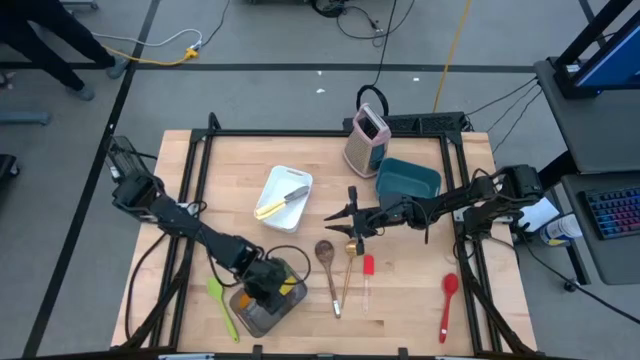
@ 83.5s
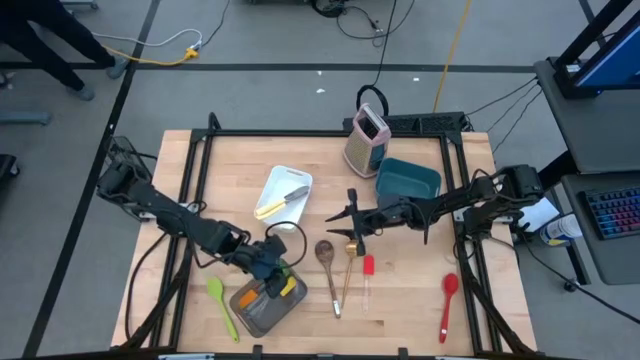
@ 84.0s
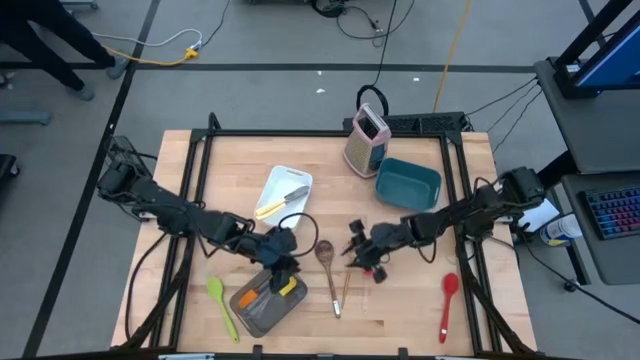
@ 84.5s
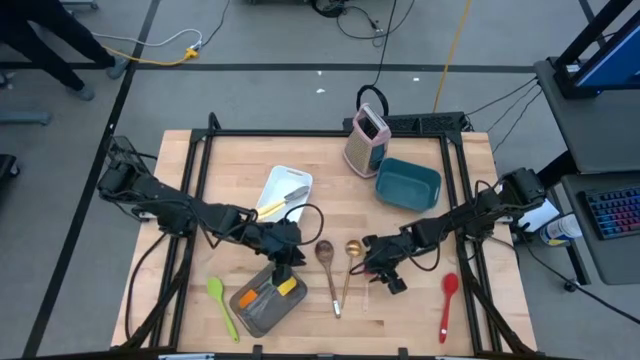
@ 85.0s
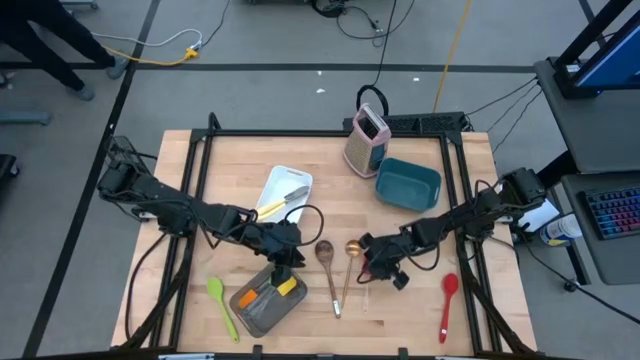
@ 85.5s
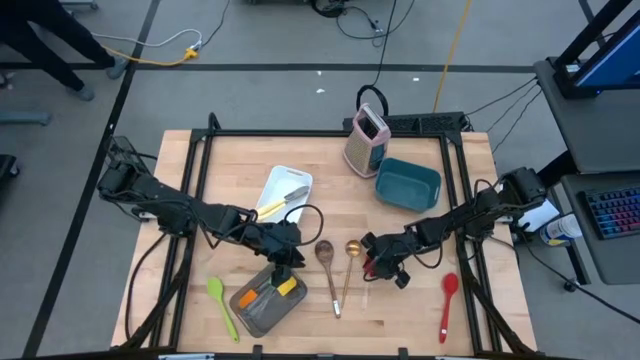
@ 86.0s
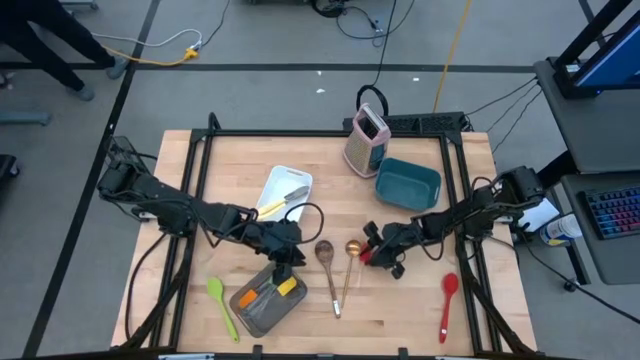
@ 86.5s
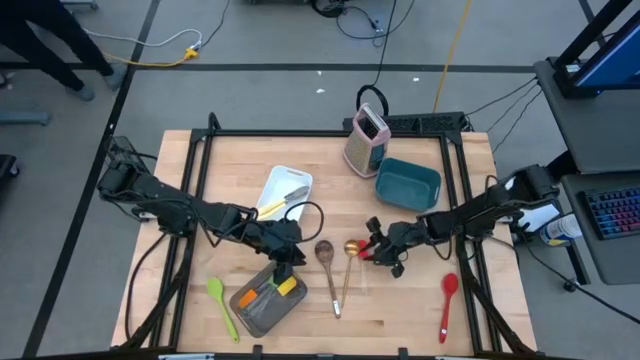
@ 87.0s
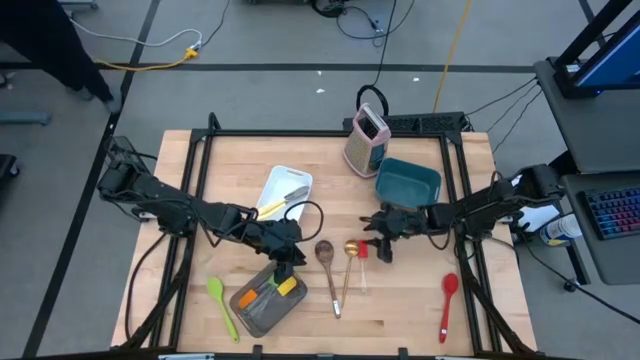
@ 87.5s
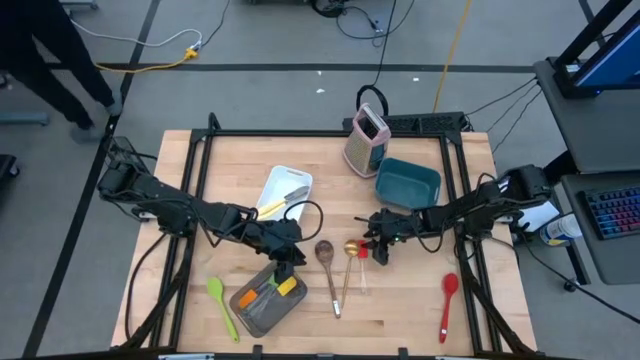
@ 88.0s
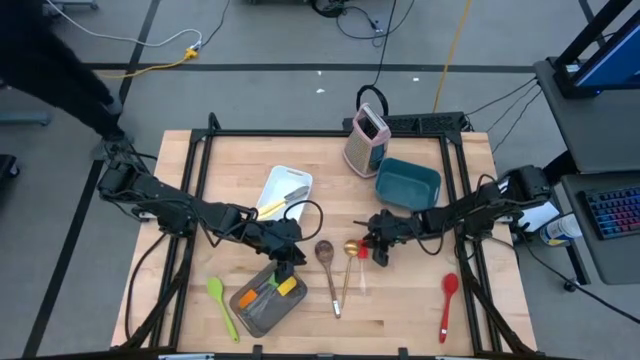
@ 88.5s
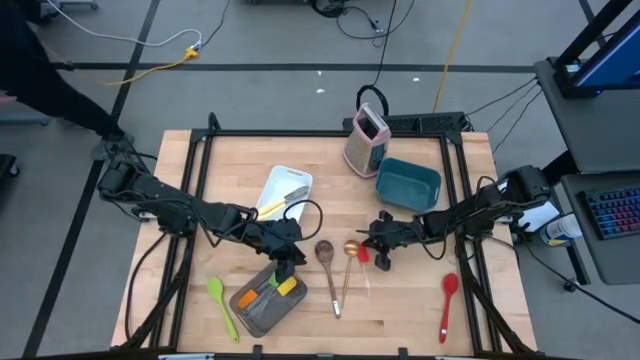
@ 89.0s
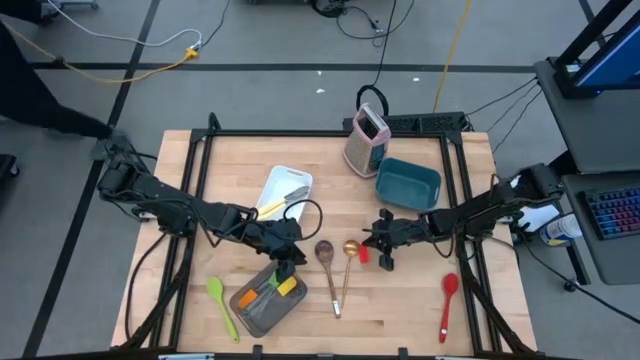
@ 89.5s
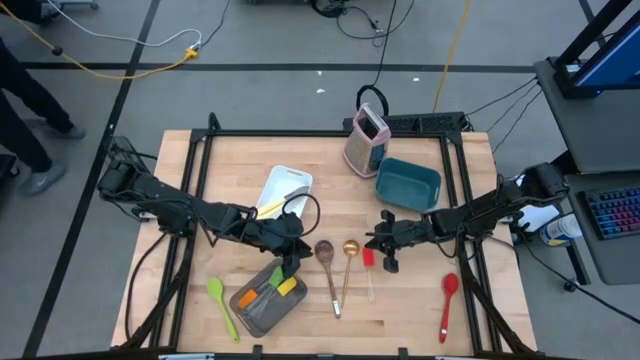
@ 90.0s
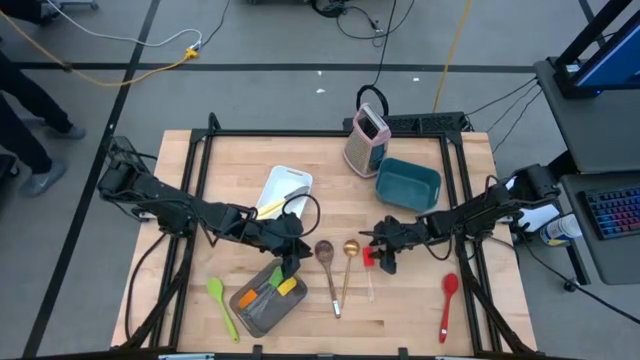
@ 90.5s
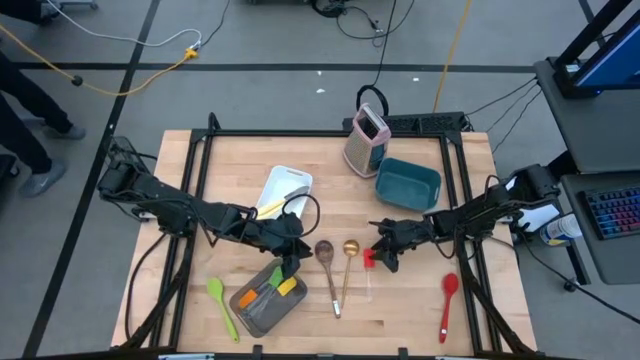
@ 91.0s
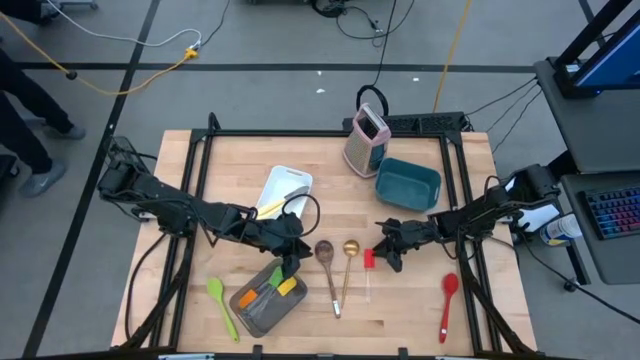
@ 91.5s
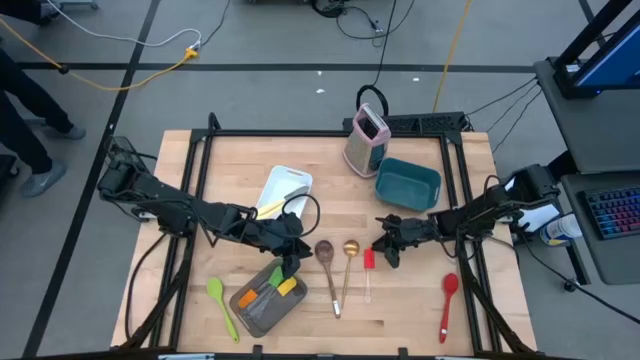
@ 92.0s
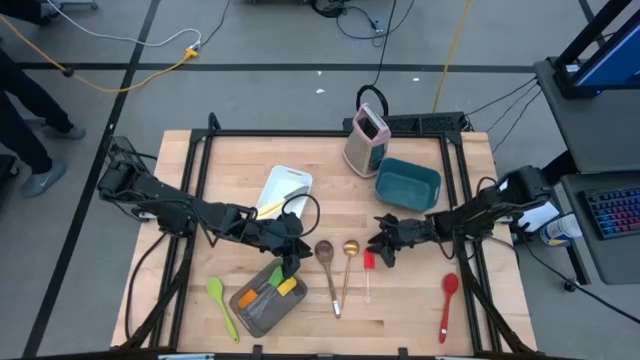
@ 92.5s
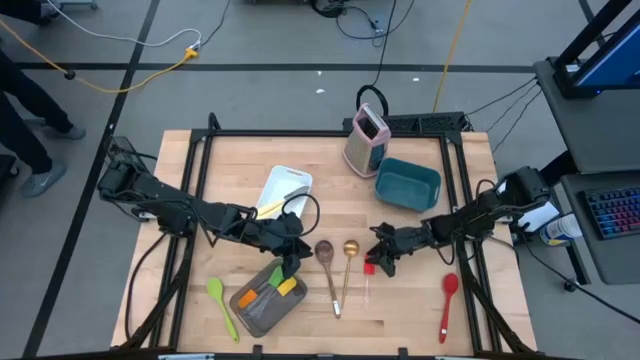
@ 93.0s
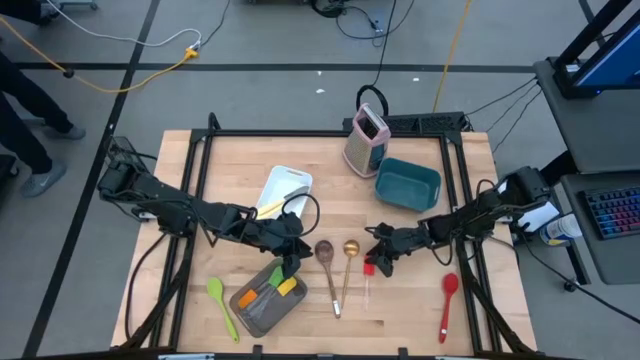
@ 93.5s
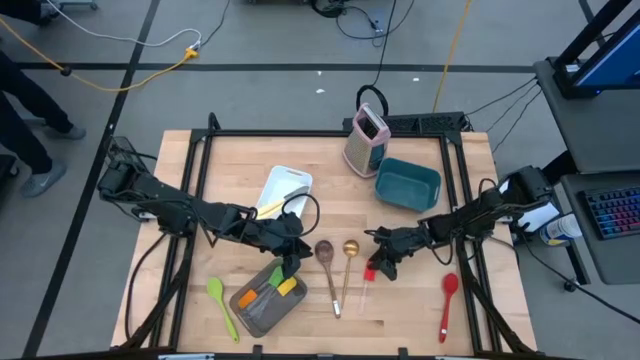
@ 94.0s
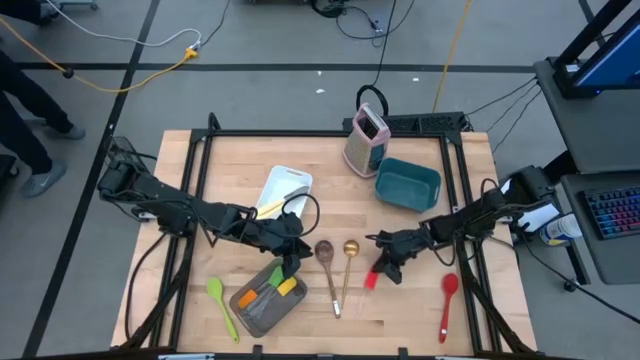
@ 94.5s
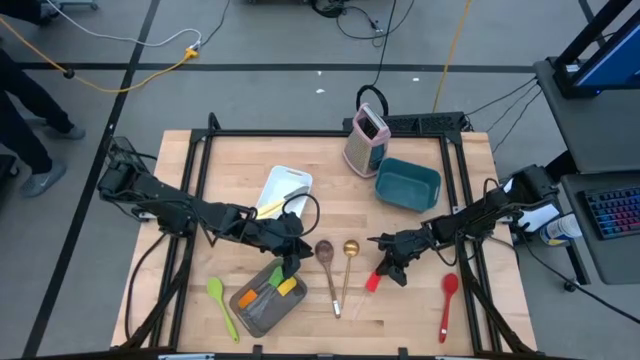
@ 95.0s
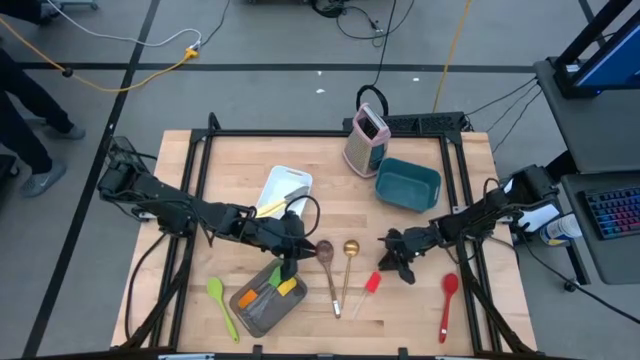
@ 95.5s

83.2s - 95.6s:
Task: Pick & Place Kitchen Items
Put the red spatula into the black bin

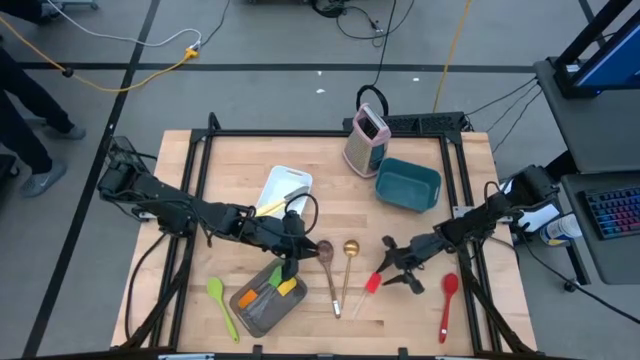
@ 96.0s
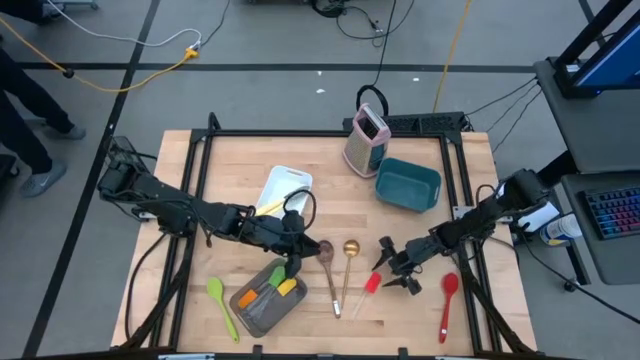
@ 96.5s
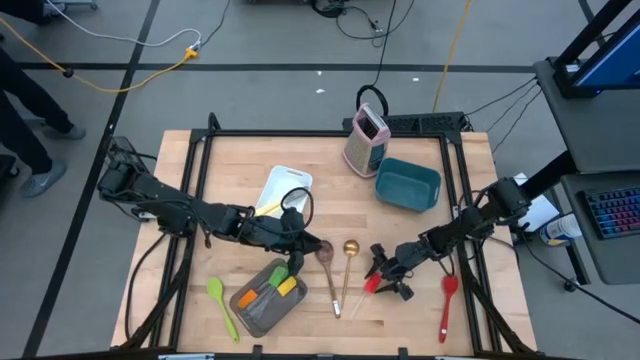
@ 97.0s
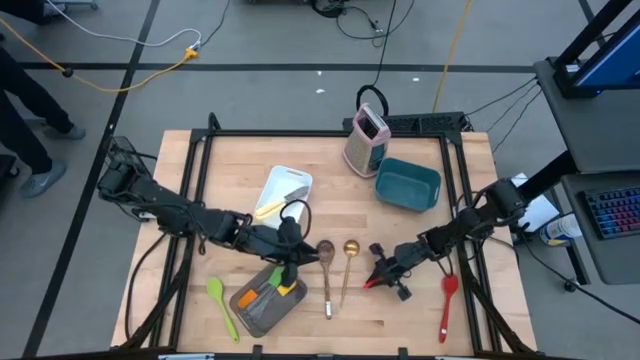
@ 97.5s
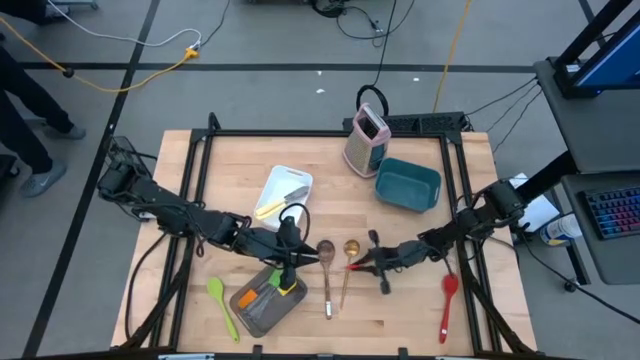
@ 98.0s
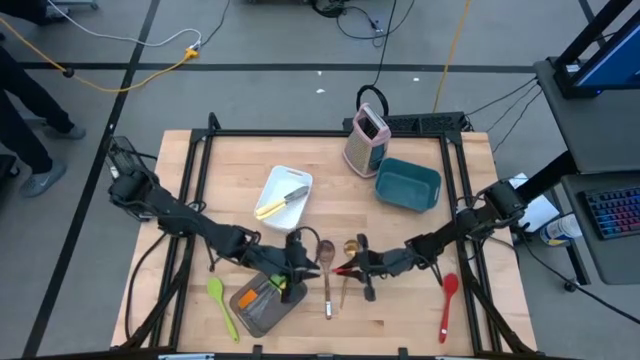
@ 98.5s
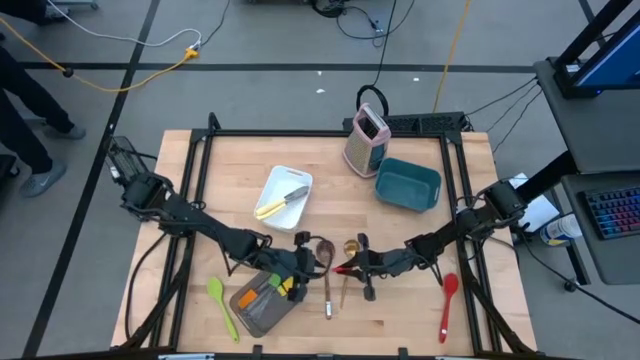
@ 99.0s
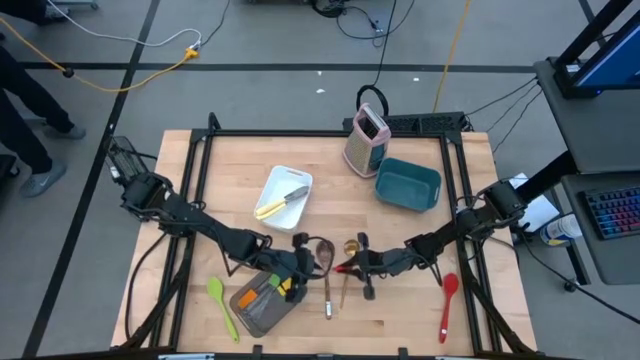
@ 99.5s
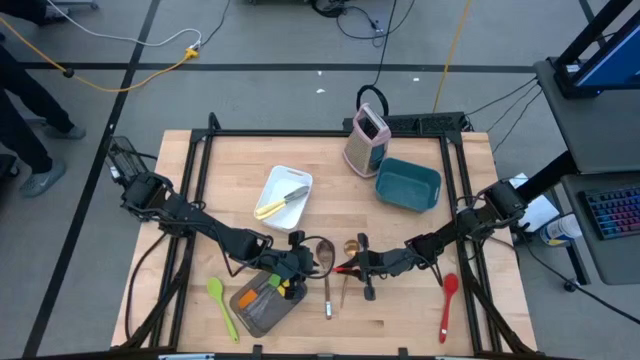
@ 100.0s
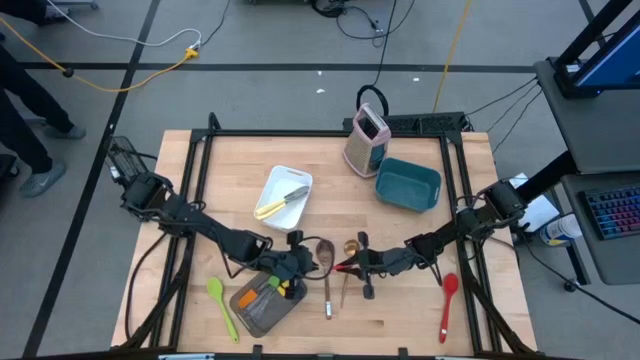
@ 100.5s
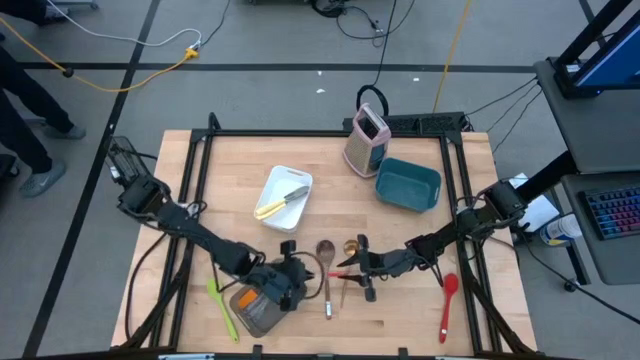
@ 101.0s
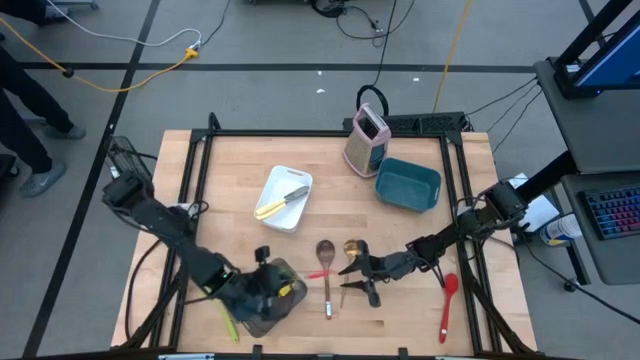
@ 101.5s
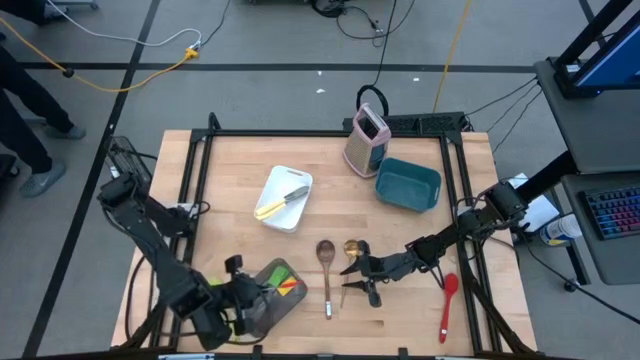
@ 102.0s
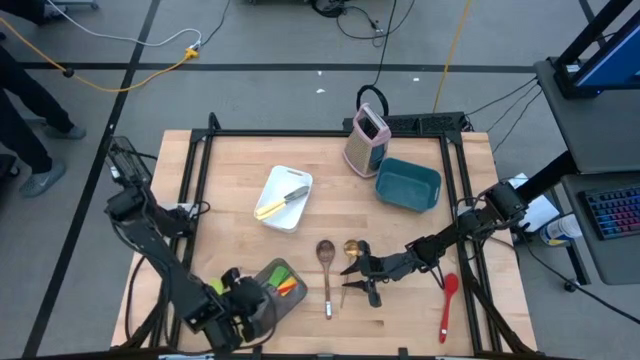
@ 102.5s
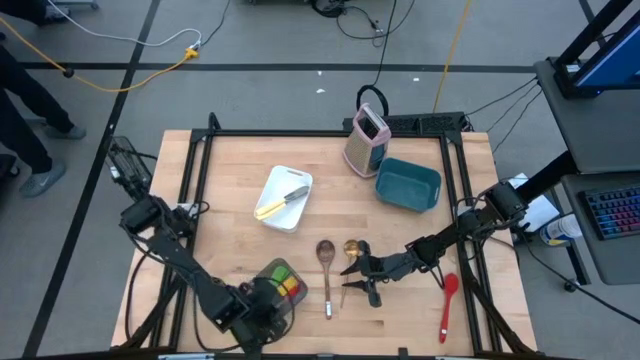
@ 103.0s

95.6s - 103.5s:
Put the red spatula into the black bin

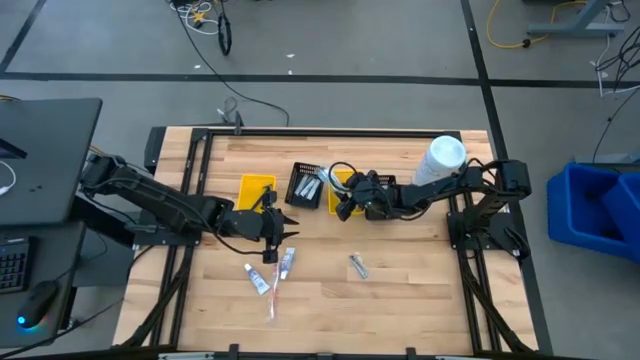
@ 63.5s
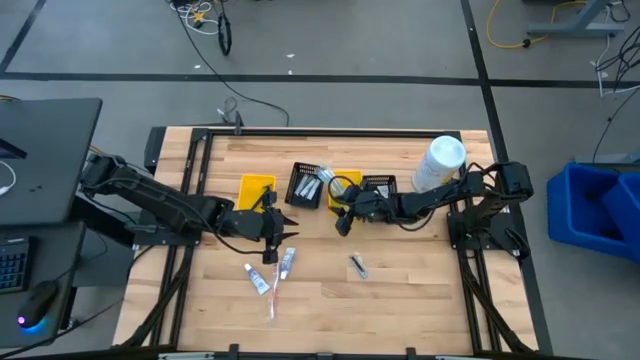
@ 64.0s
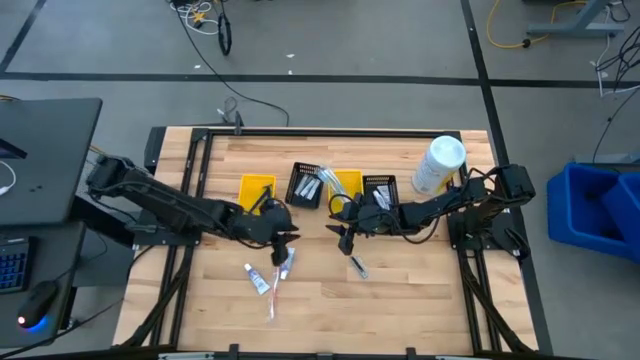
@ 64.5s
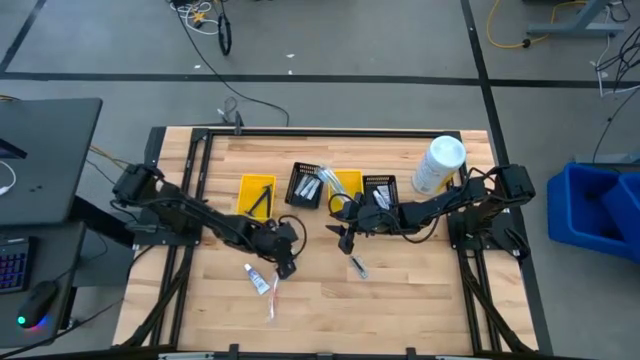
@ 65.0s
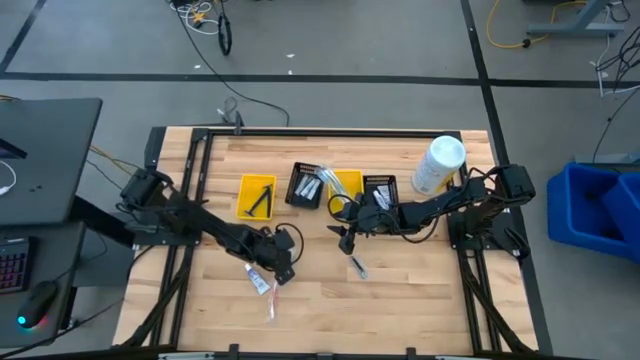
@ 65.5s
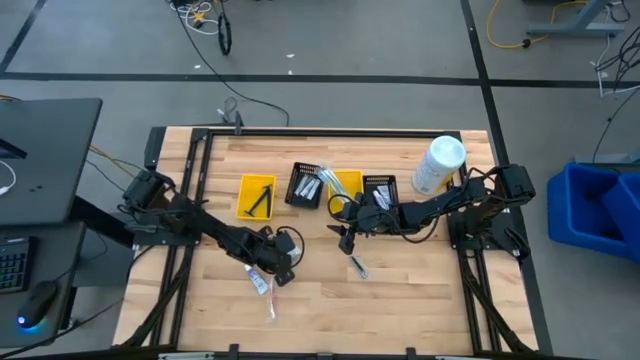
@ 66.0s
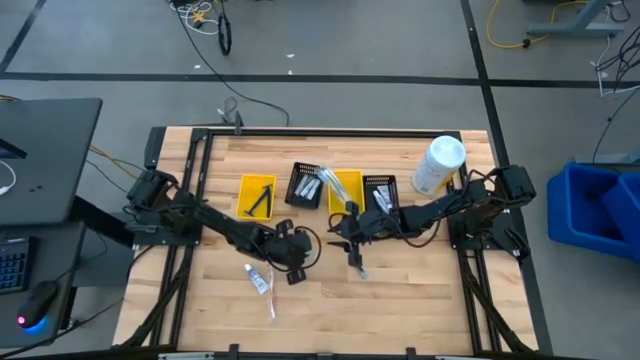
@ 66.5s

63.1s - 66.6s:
Task: Pick & Place Travel size toiletries
Put the violet toothpaste into the right black bin
